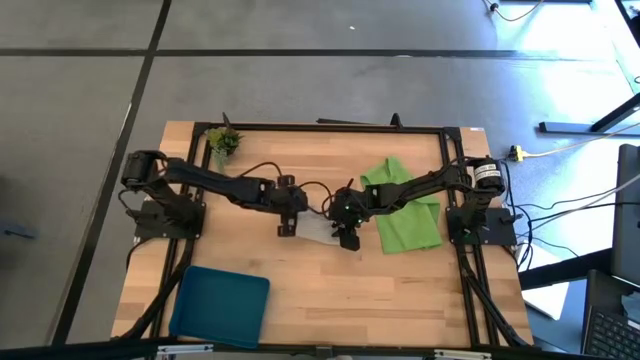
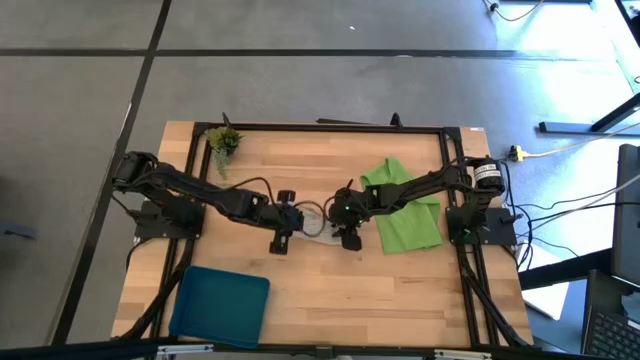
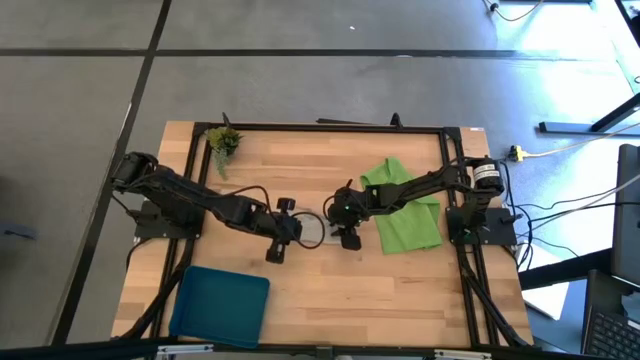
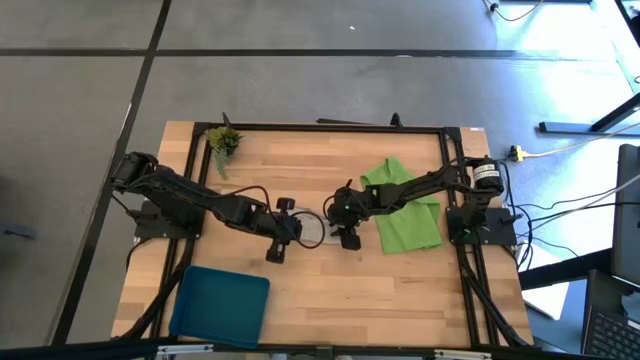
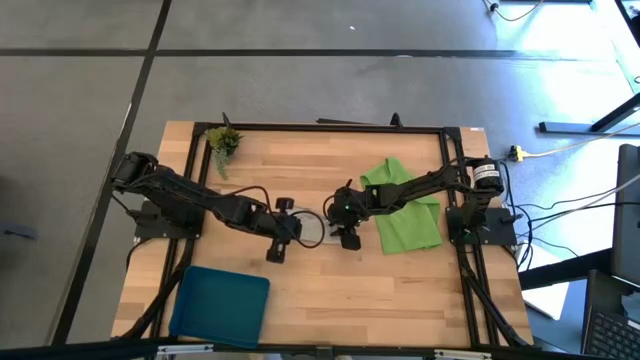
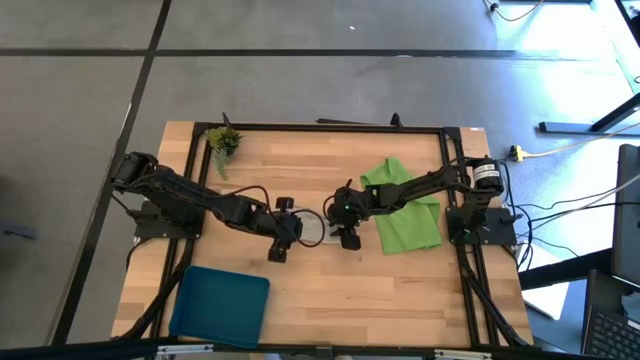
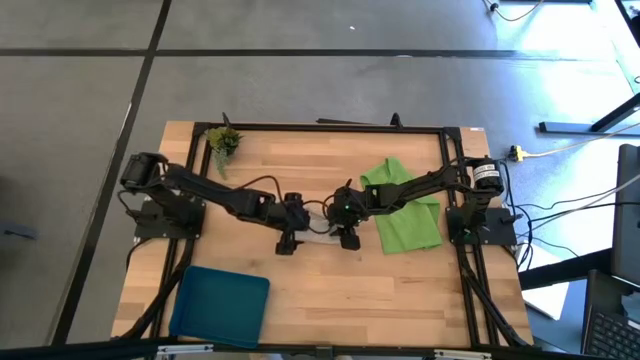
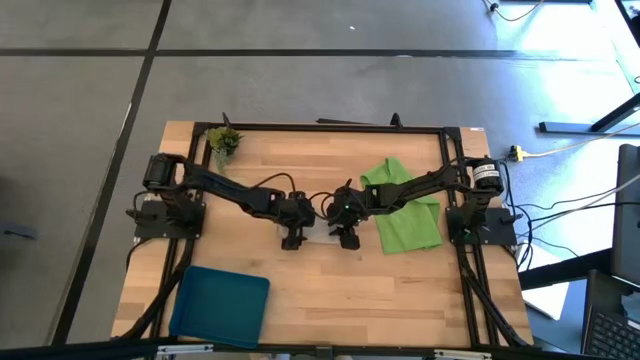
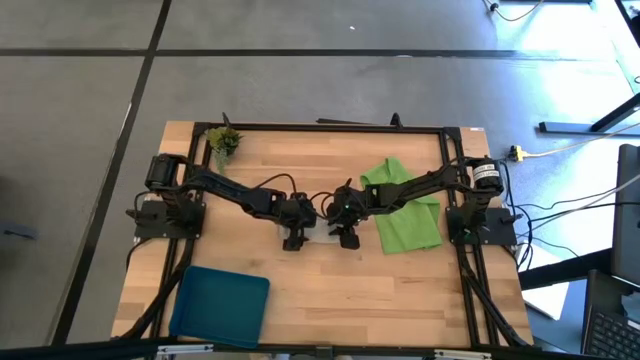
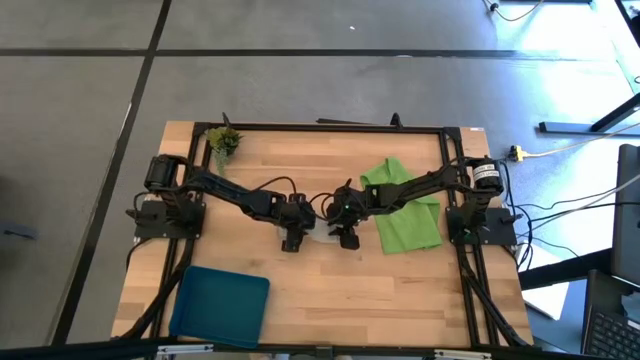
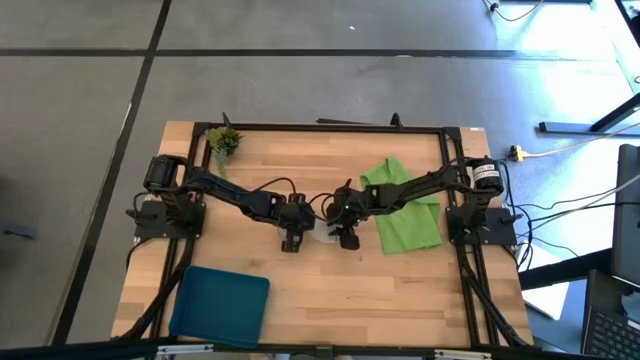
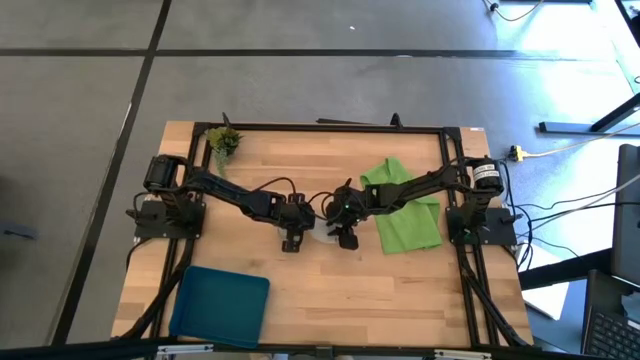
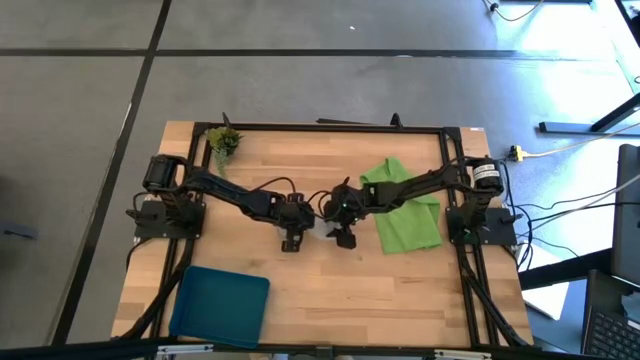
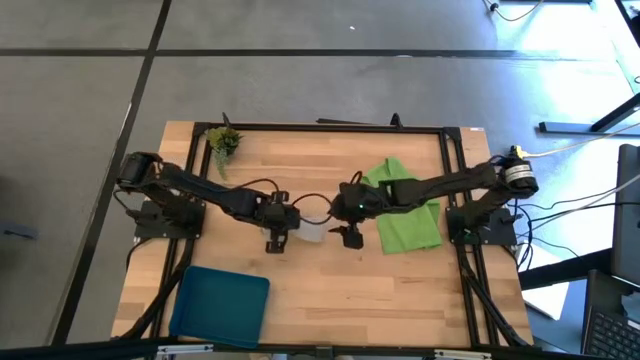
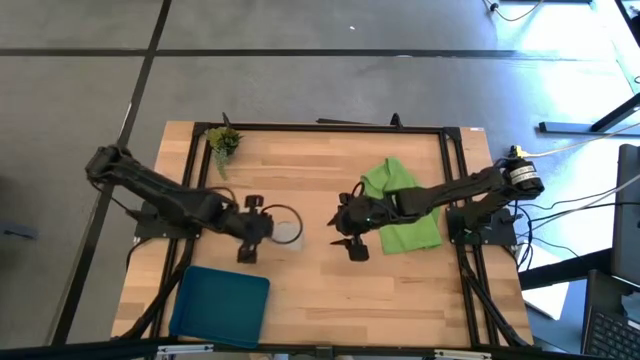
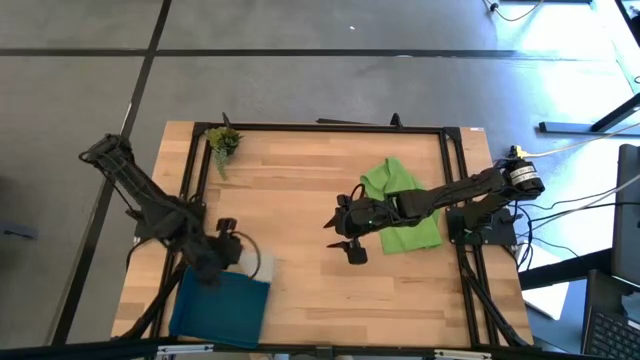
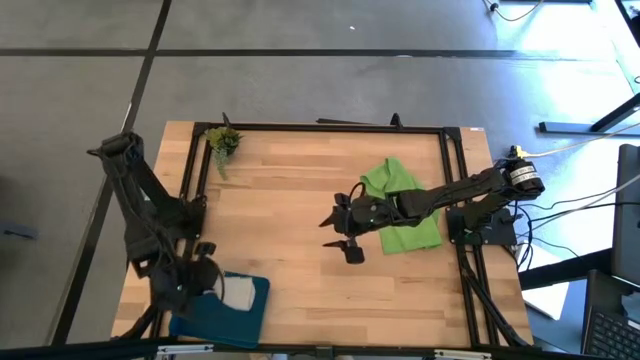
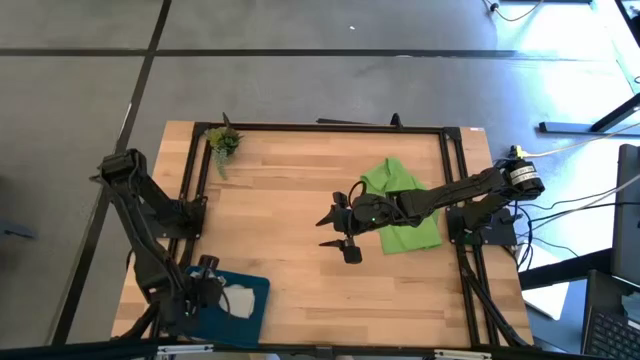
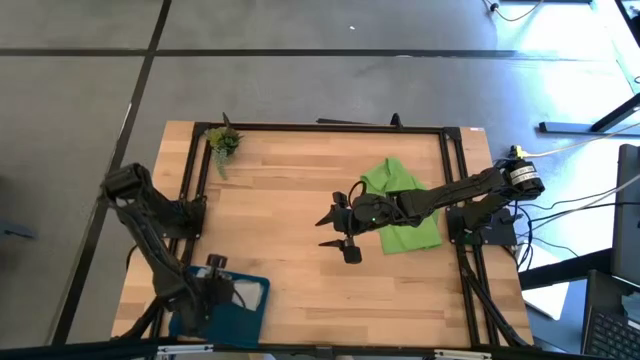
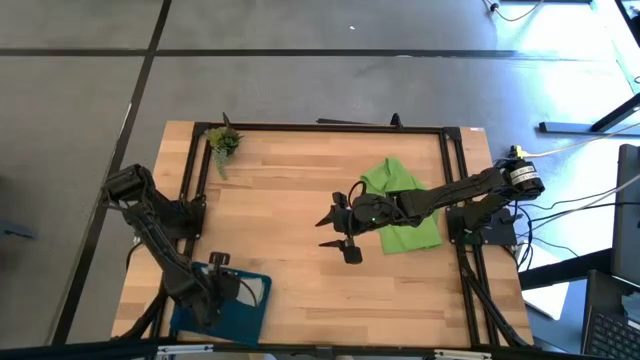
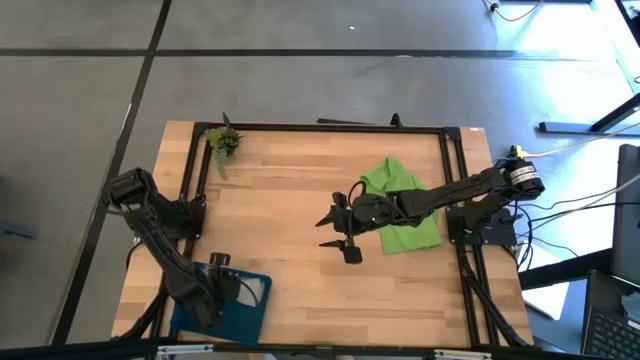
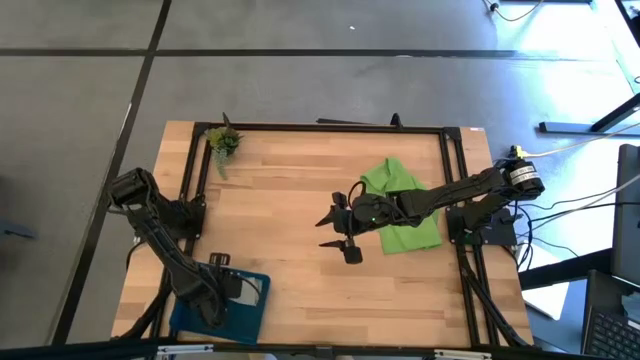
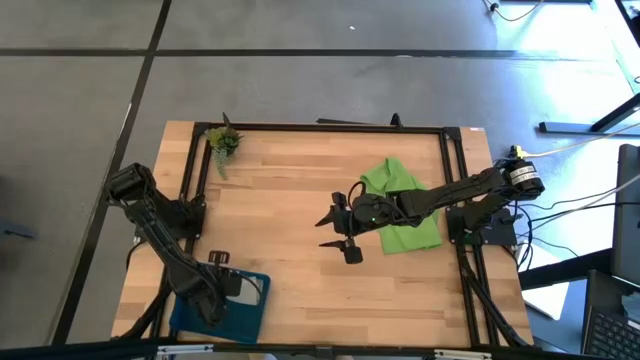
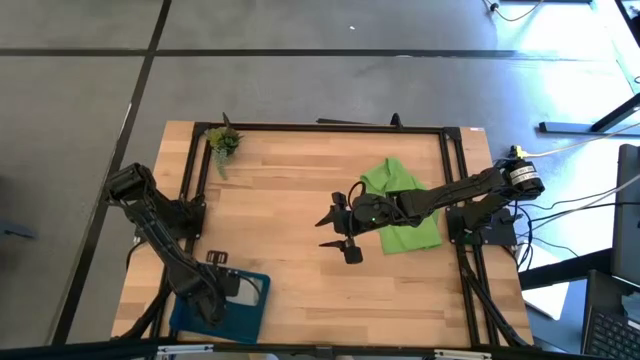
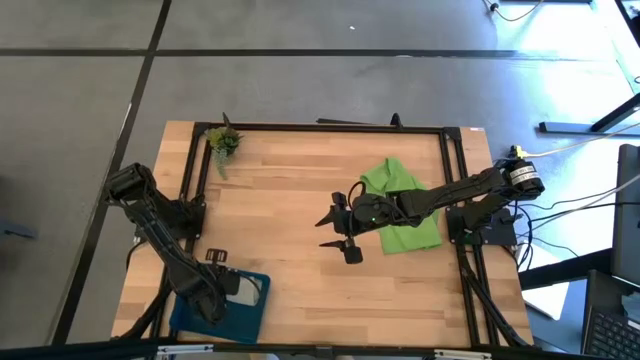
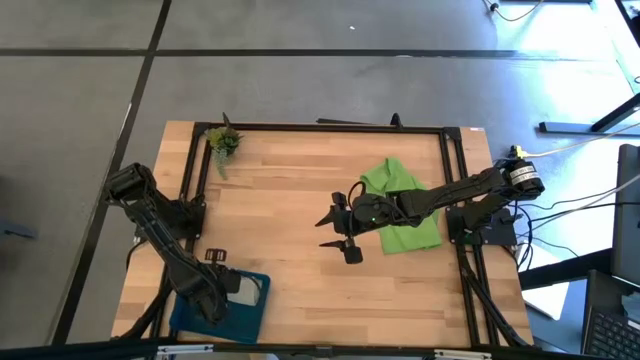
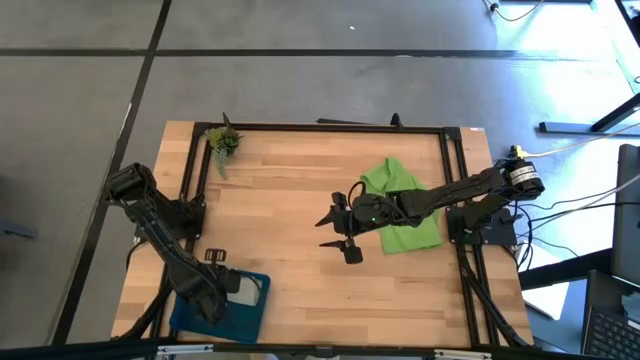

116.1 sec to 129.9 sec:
Task: Fold microfiber towels
Put the gray microfiber cloth into the blue bin

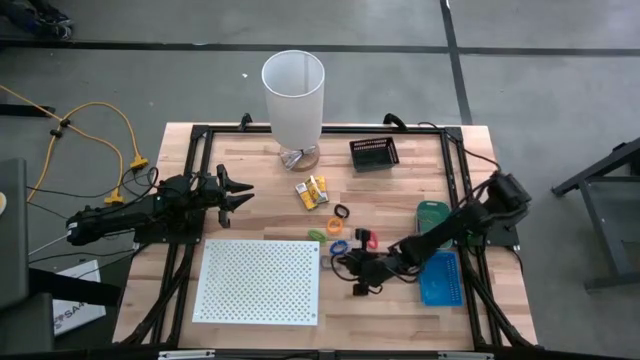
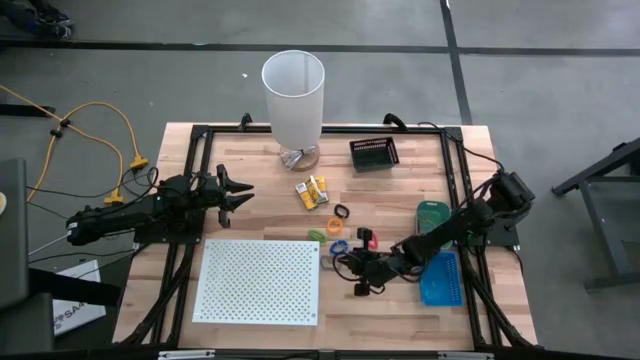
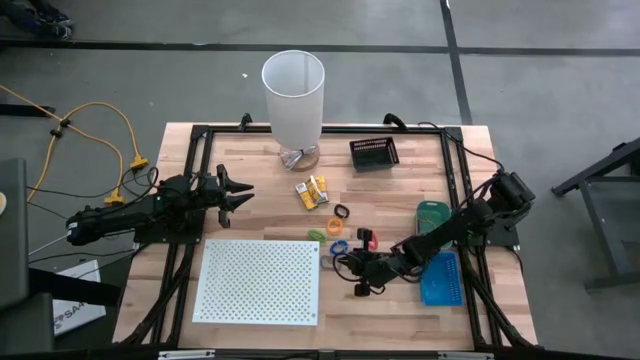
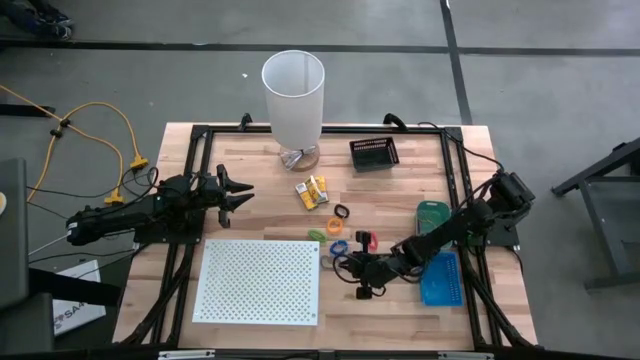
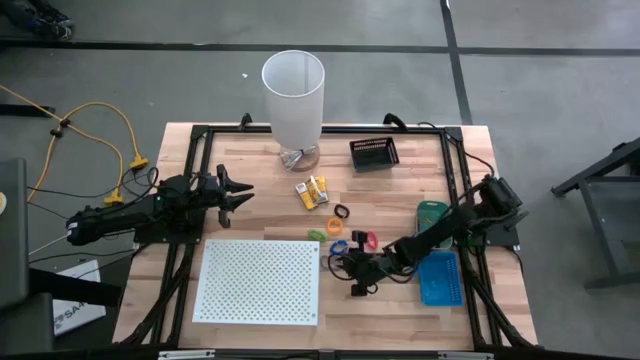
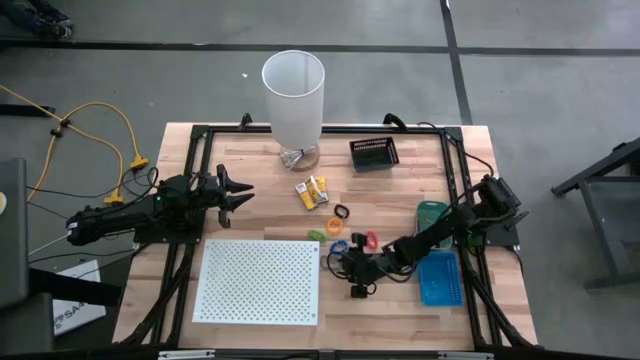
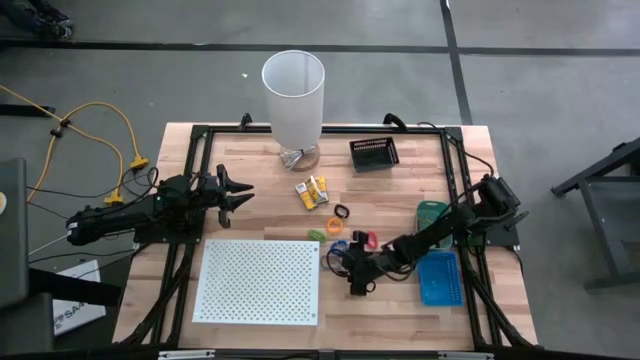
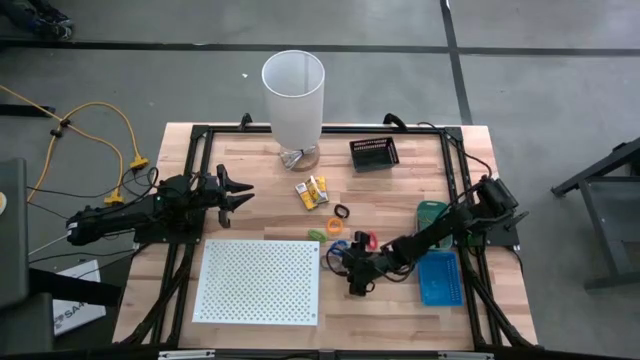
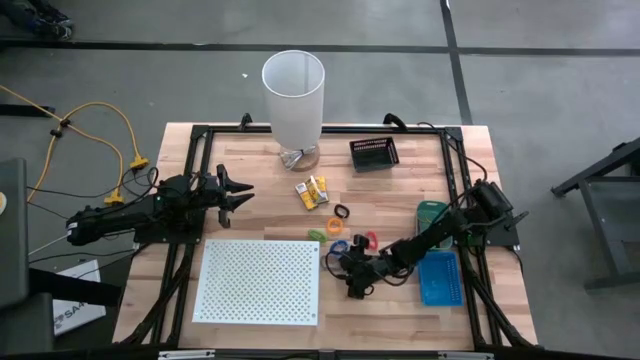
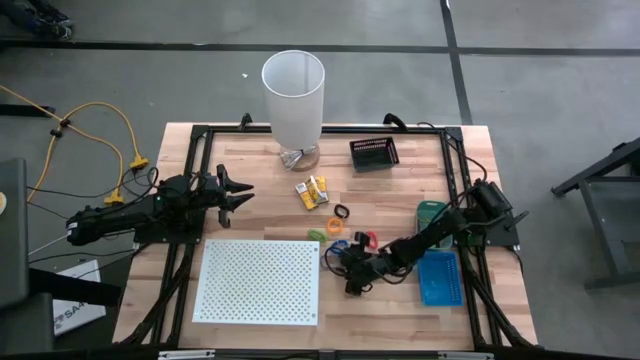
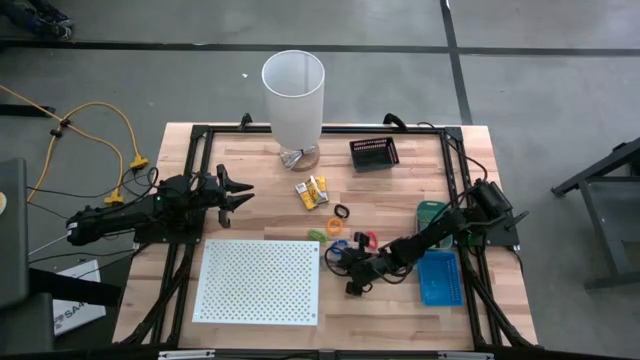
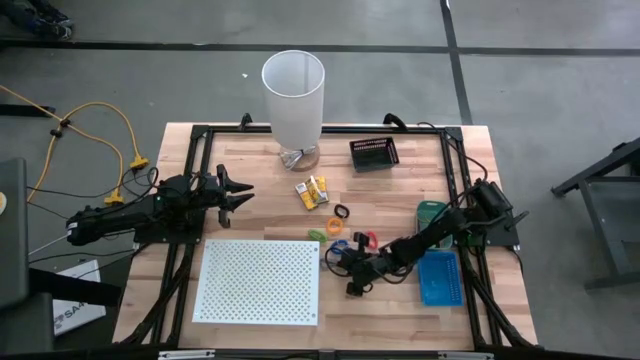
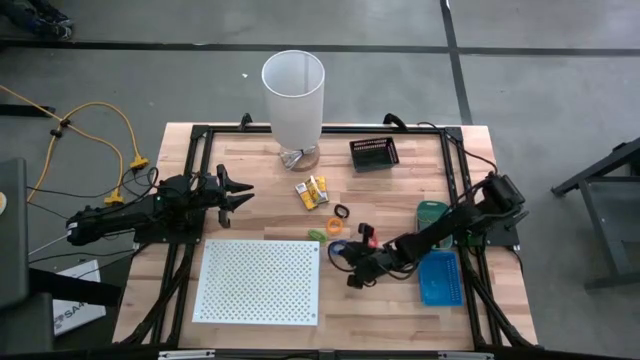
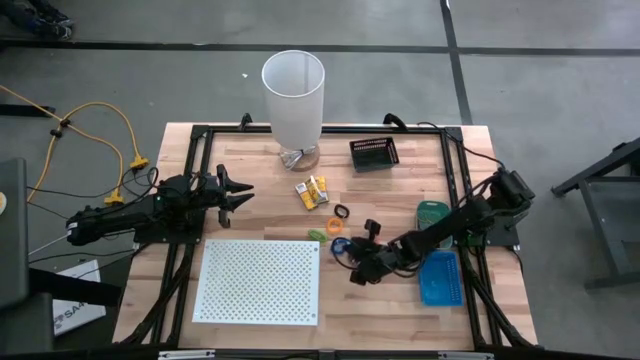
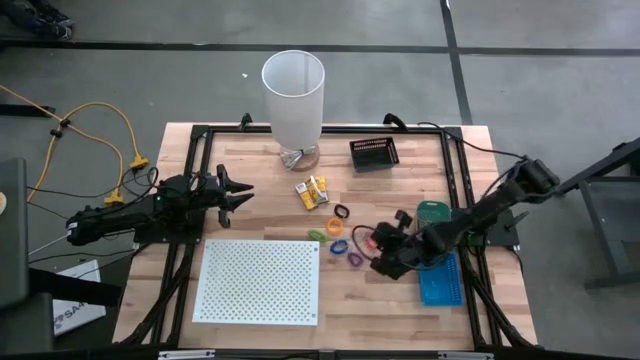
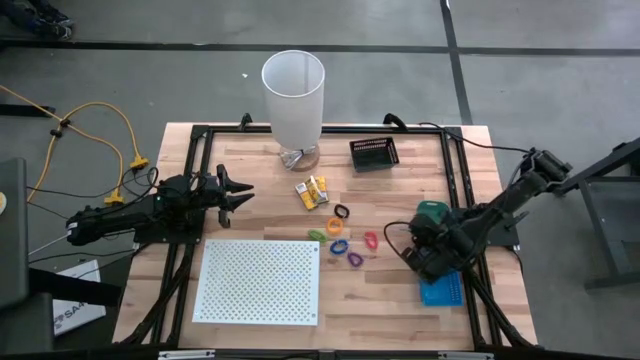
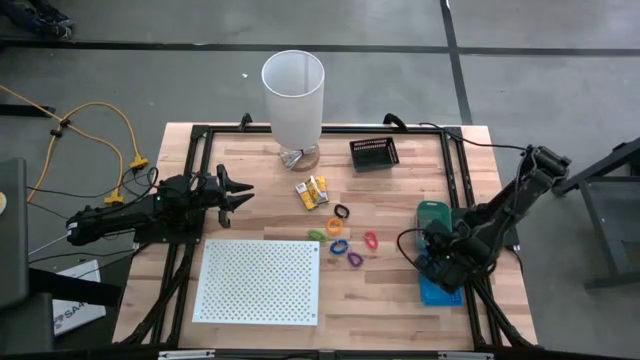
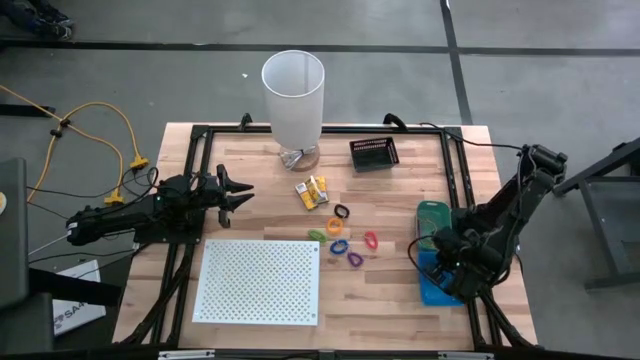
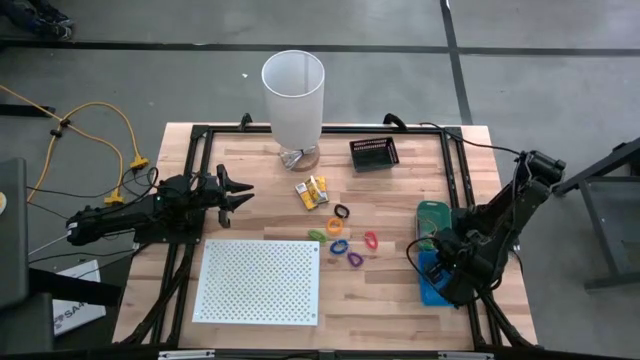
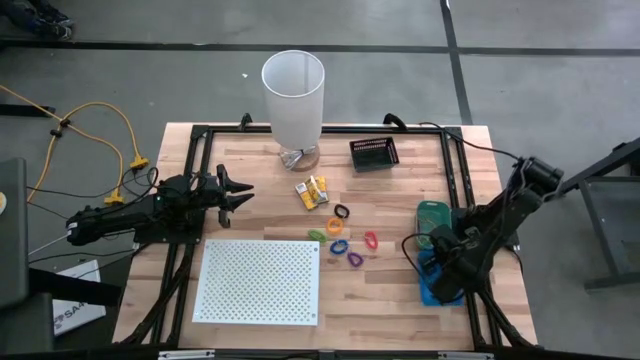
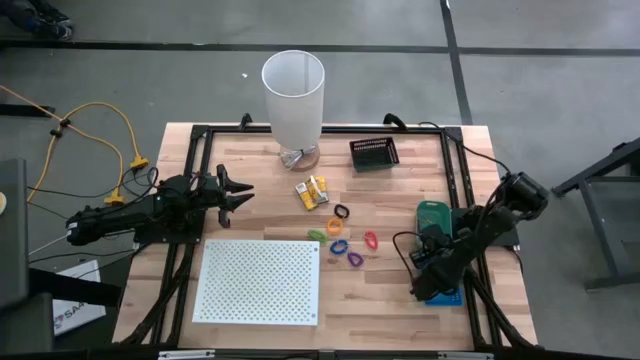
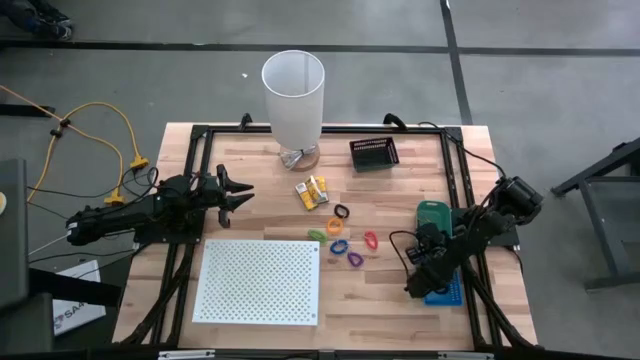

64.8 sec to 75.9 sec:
Task: Pick & Place Office Desk Supplies
Put the blue rubber bands into the green bin
